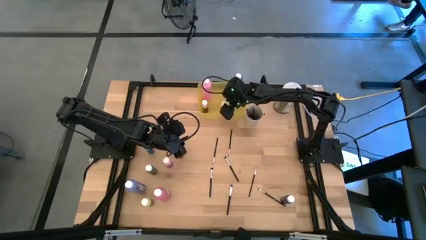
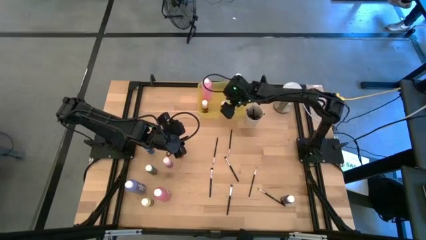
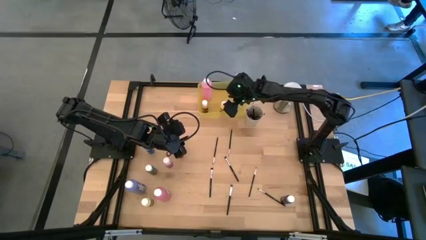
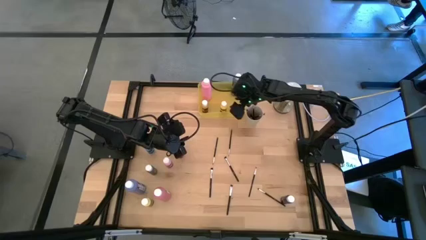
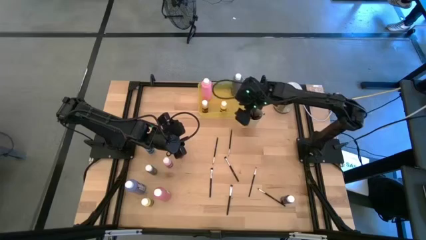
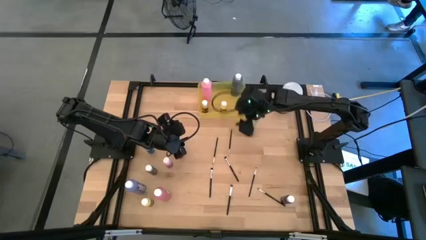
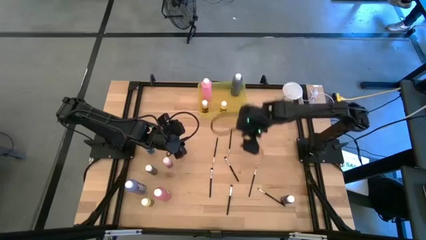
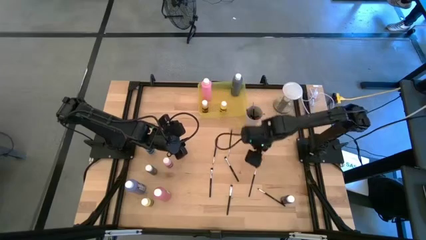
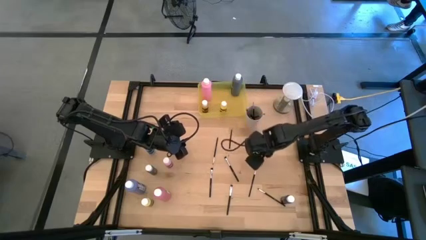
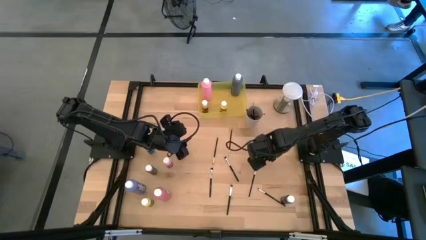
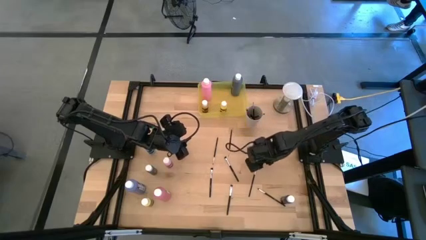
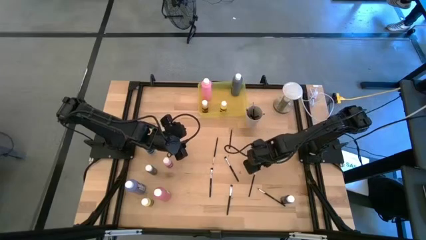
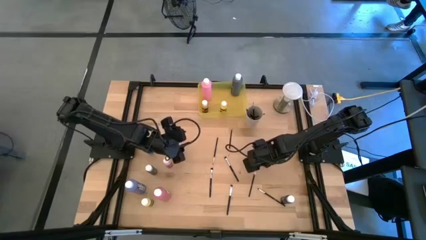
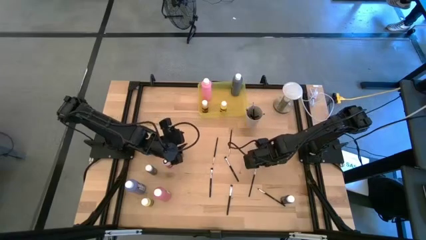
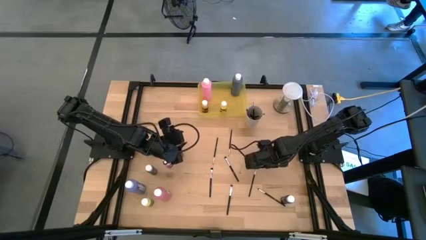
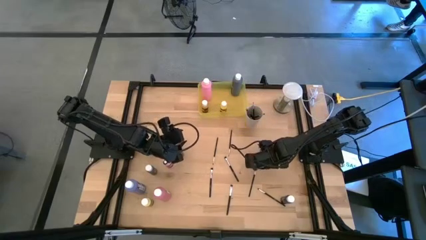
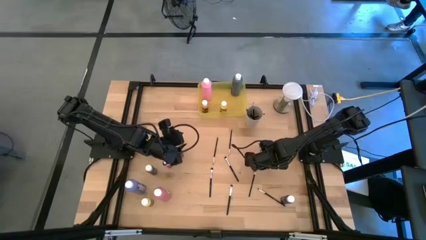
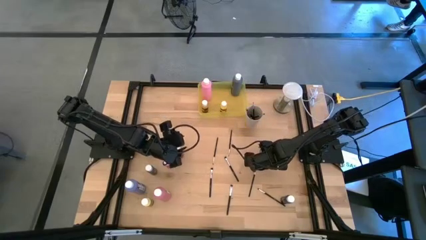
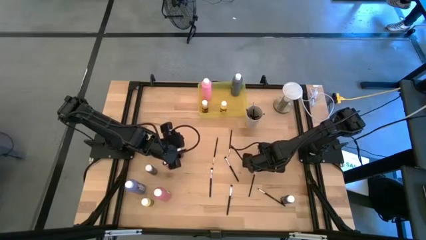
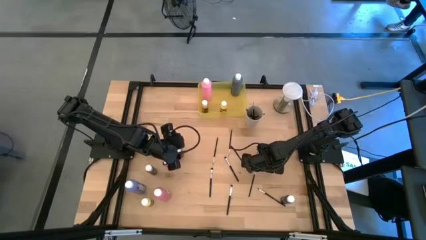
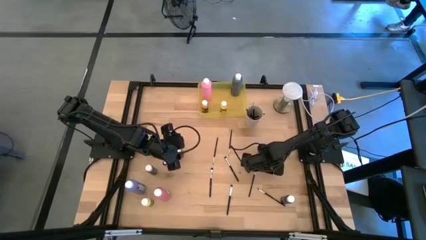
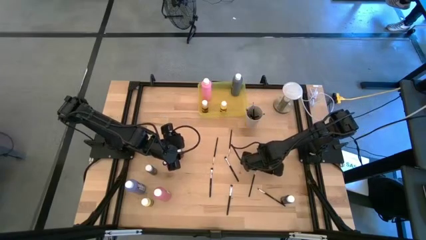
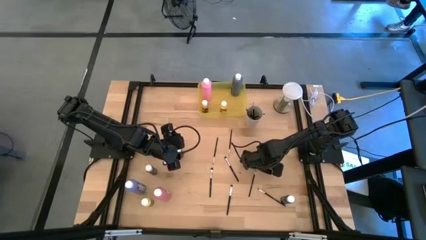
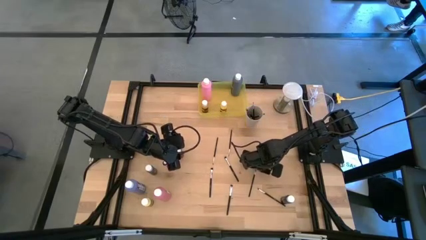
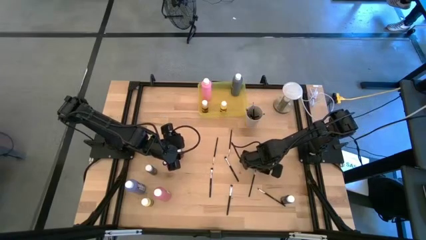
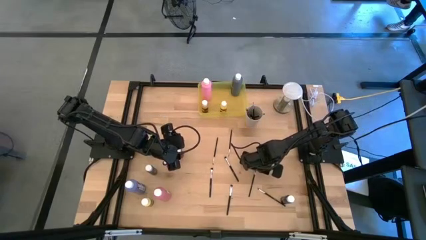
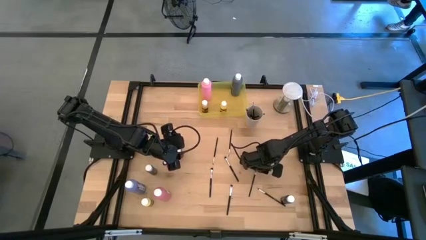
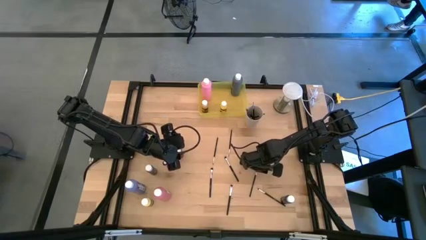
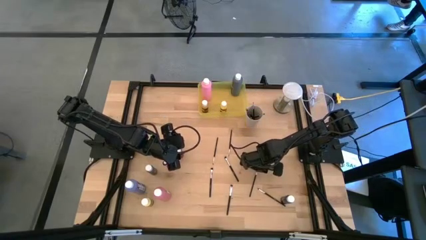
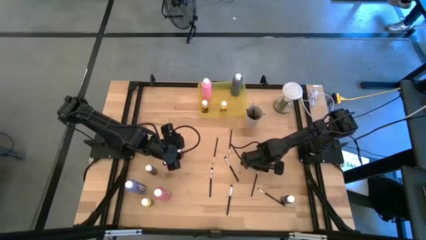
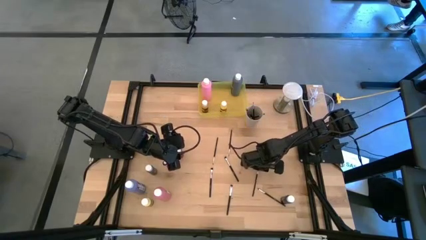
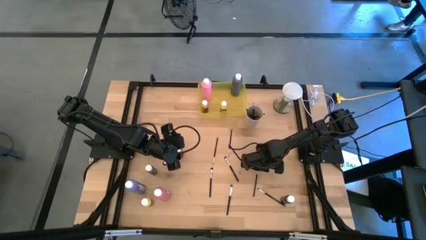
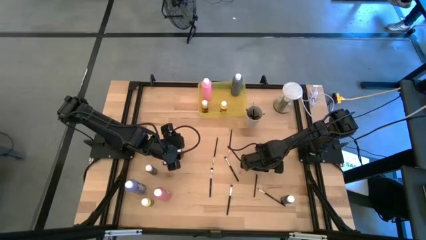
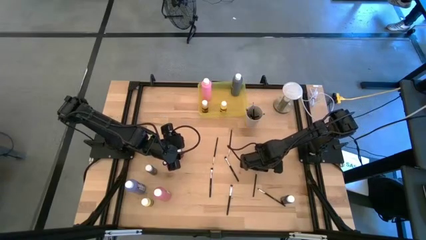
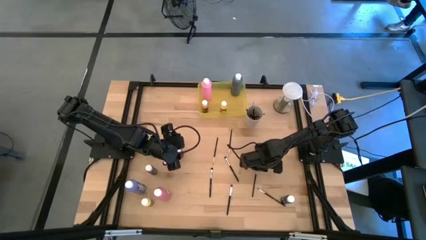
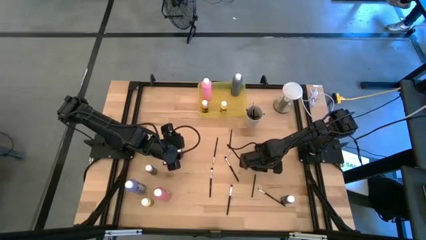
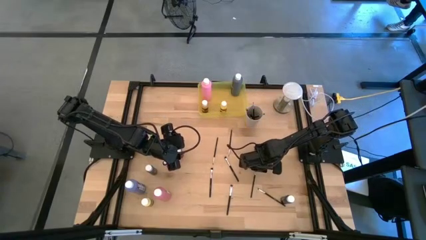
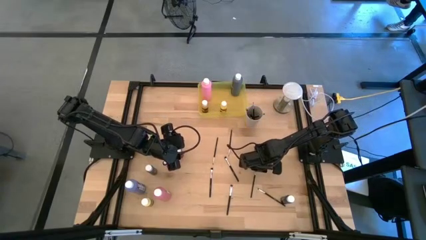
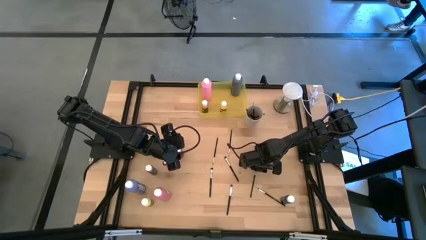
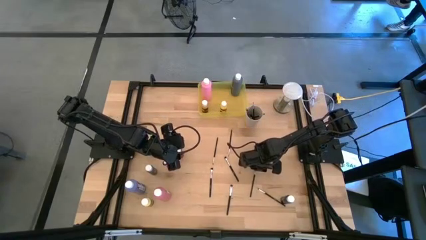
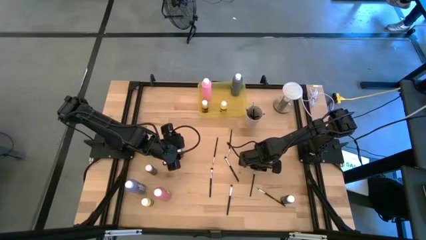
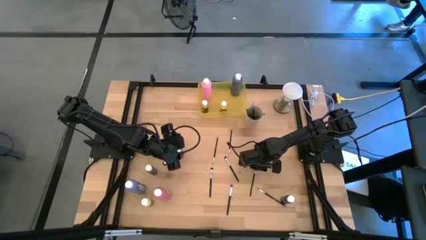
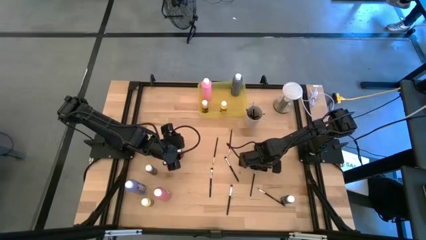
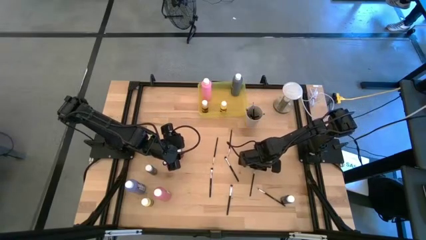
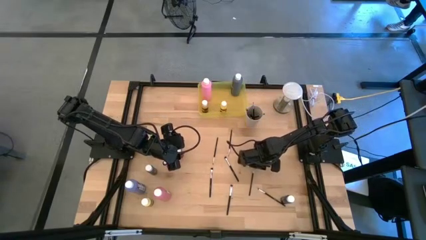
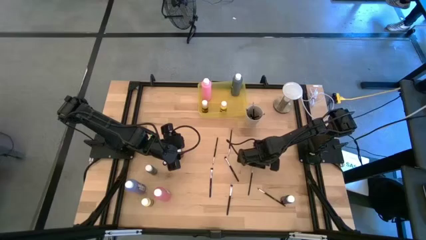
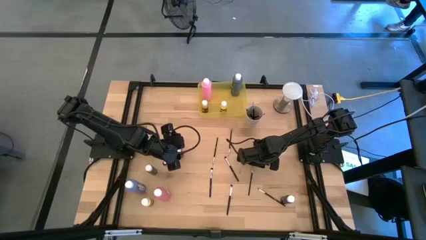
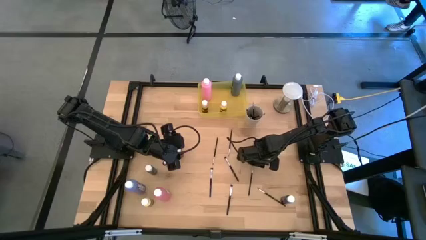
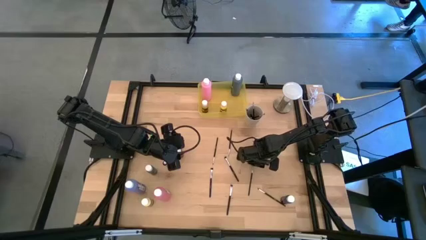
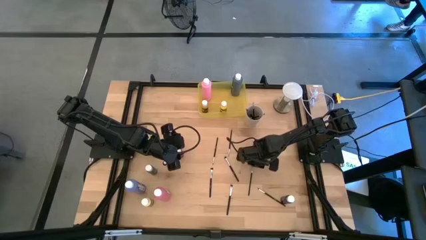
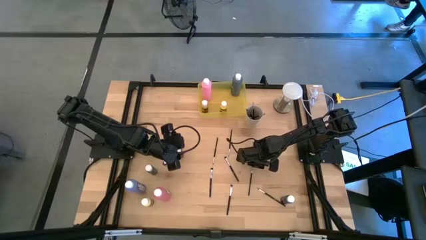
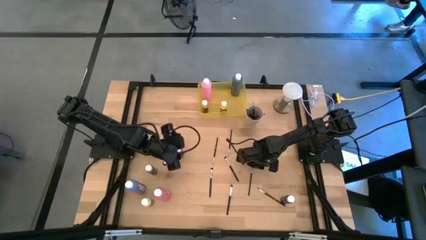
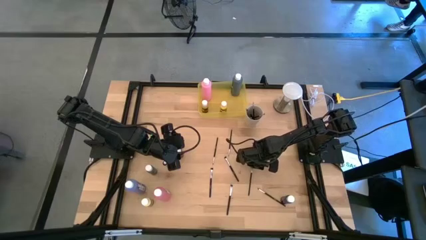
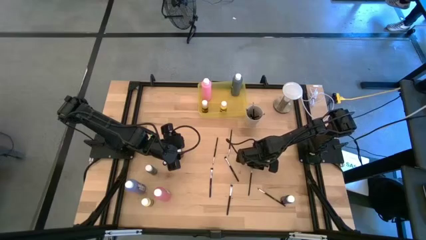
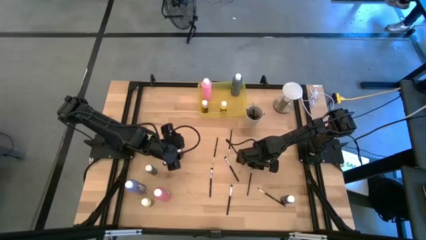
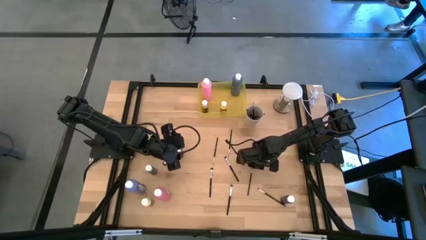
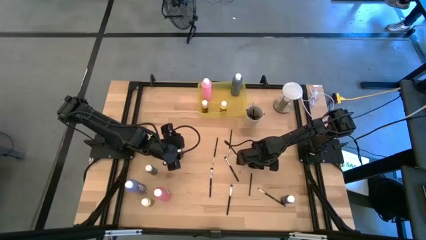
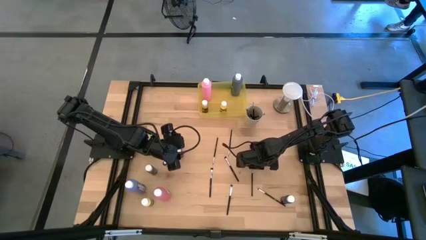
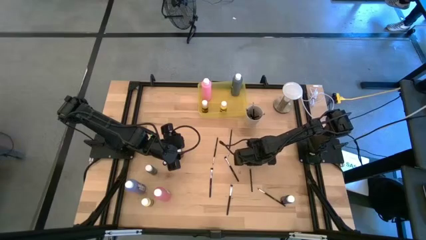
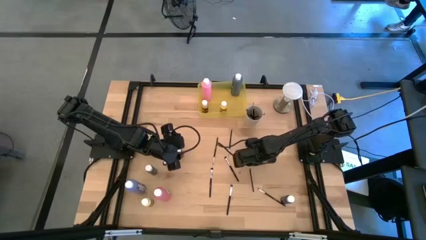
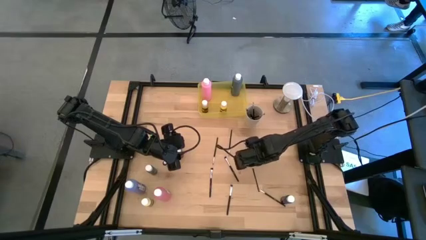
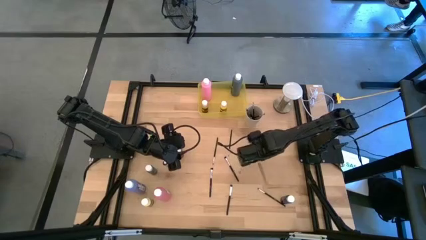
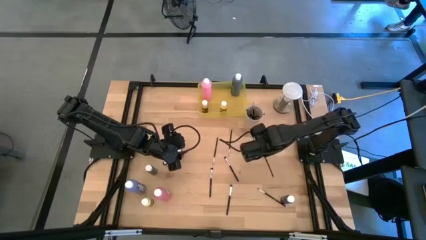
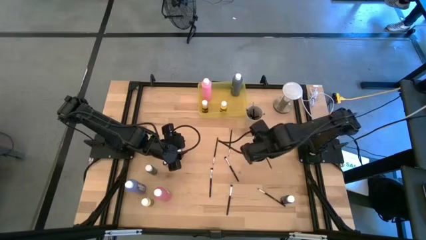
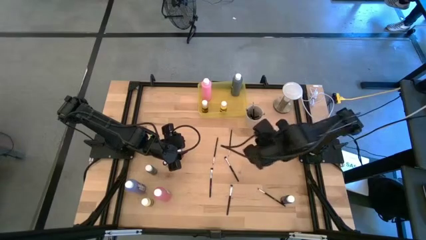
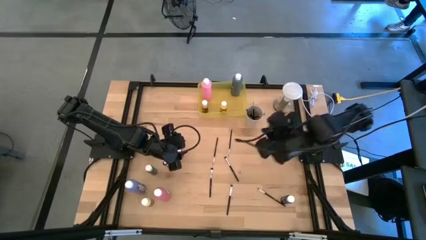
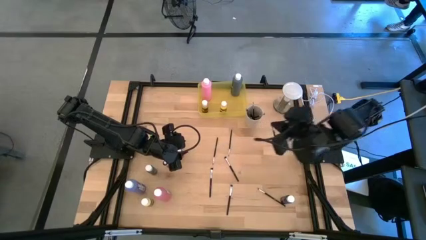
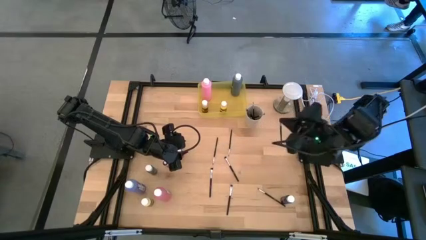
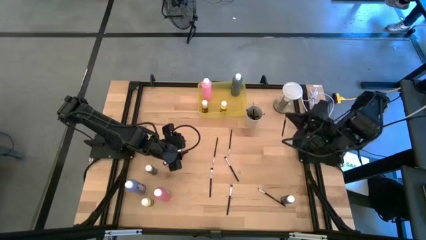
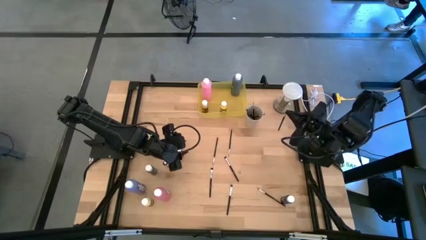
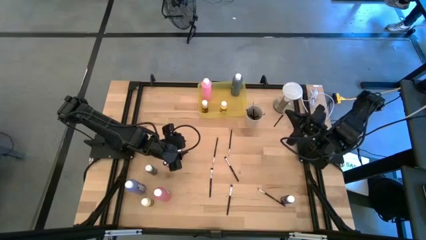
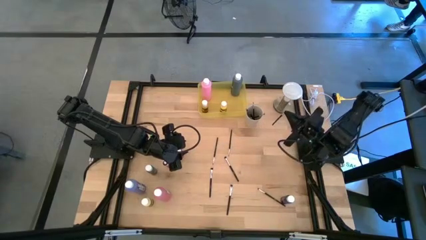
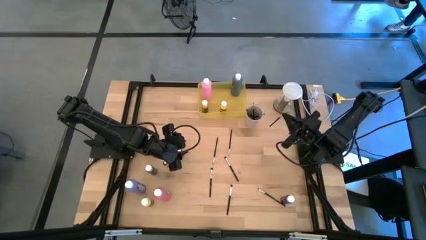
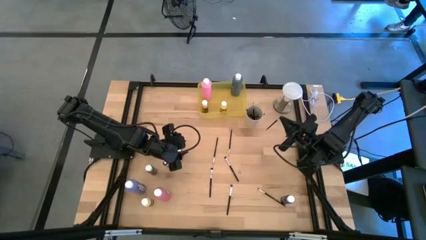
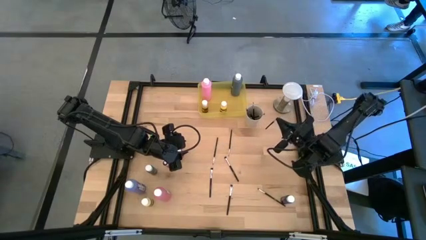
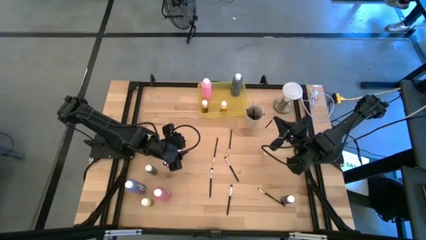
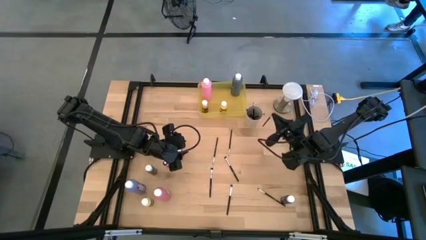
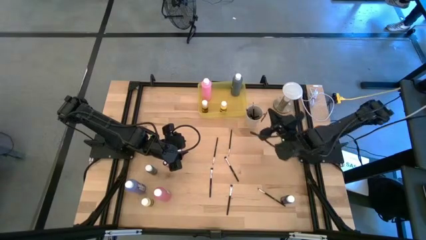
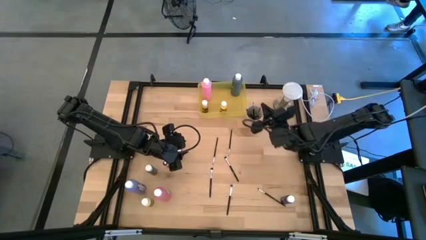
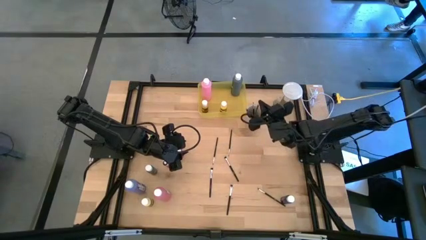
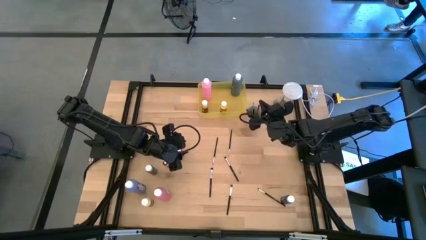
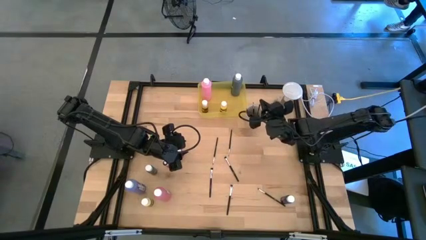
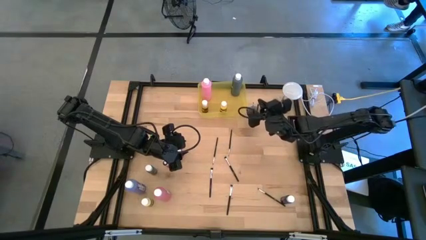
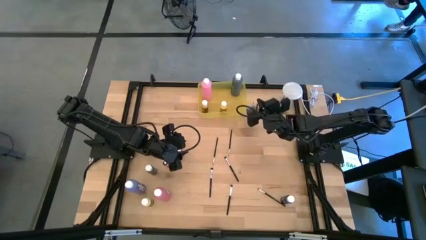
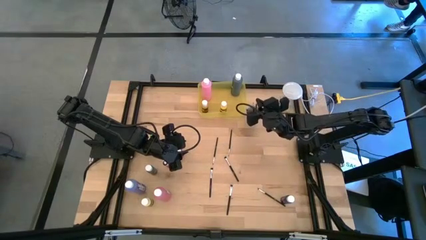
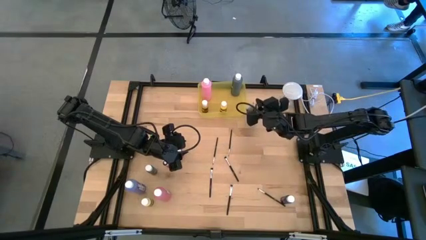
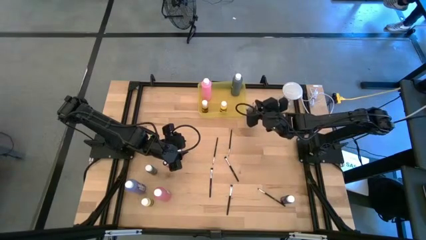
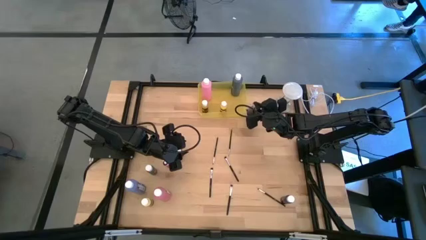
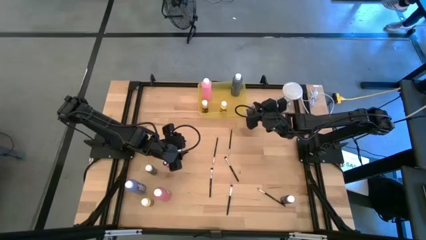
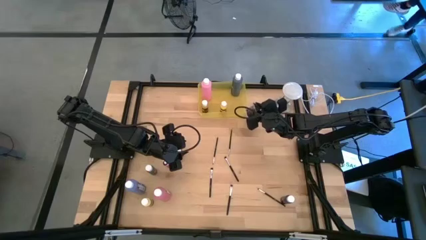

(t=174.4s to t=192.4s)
Task: Pick & Place Paint Supplies
Put the silver paint brush into the white cup
